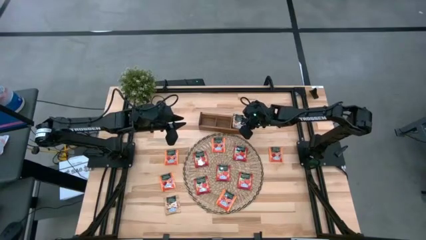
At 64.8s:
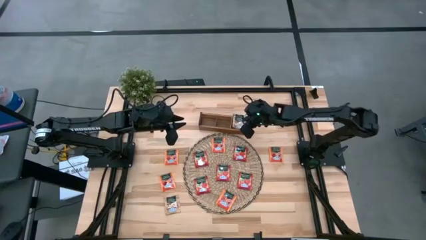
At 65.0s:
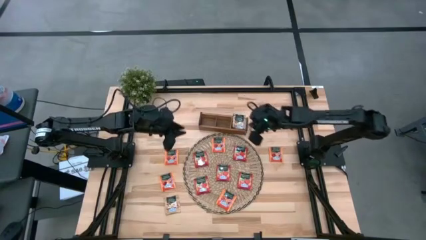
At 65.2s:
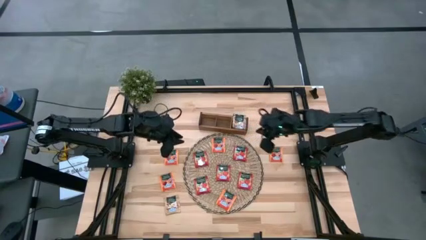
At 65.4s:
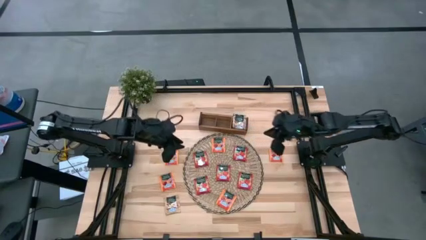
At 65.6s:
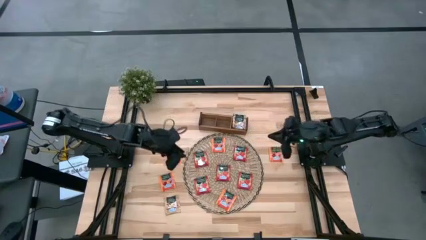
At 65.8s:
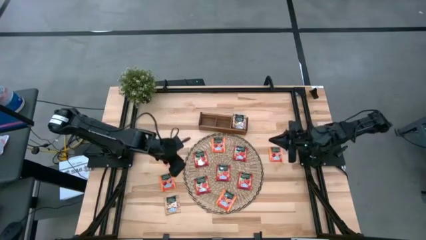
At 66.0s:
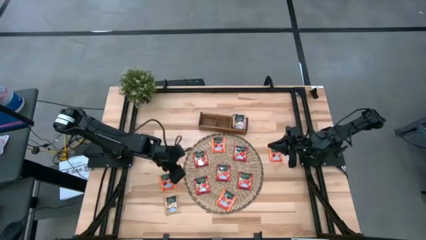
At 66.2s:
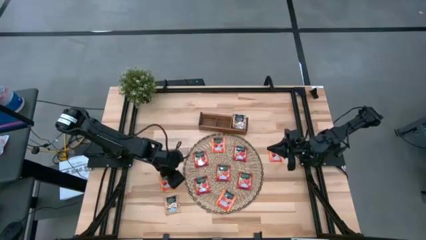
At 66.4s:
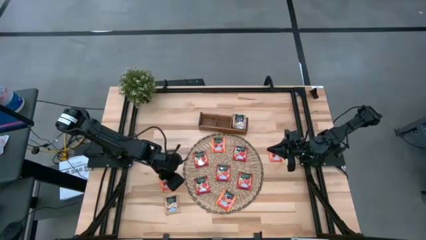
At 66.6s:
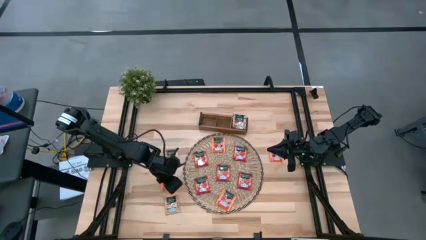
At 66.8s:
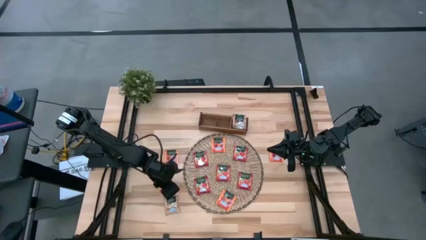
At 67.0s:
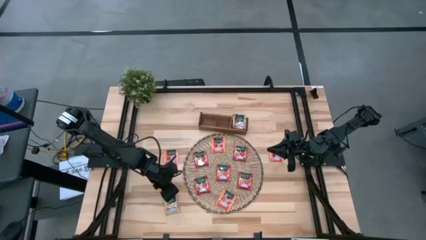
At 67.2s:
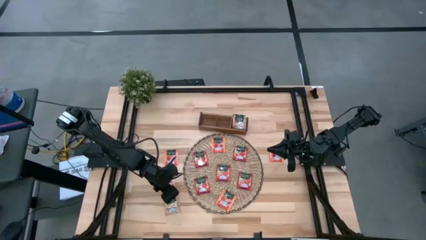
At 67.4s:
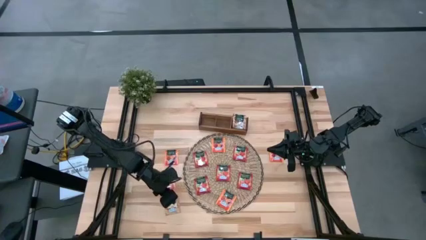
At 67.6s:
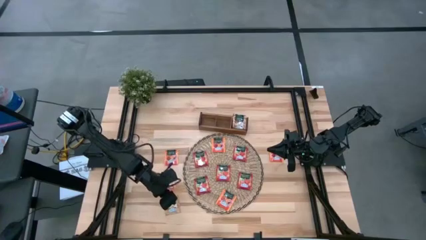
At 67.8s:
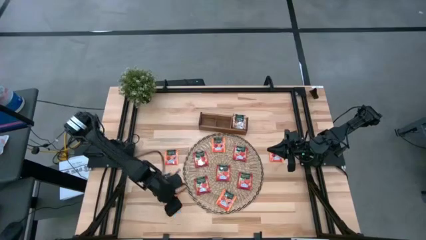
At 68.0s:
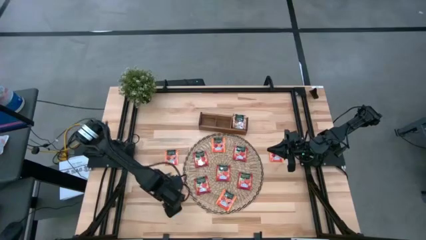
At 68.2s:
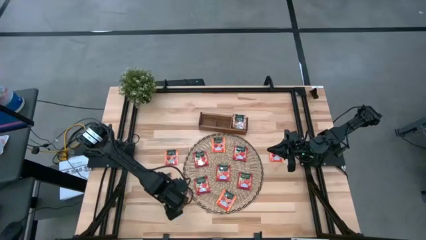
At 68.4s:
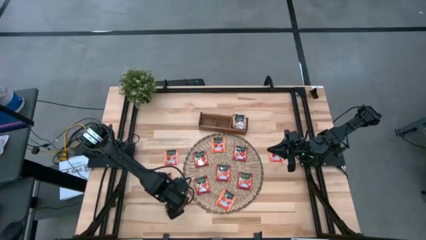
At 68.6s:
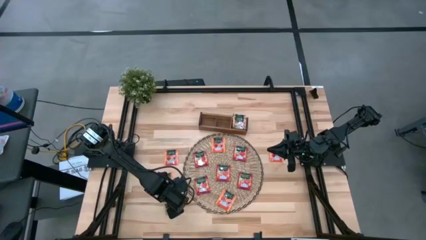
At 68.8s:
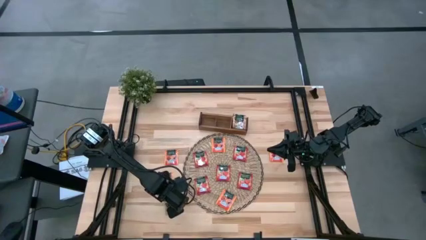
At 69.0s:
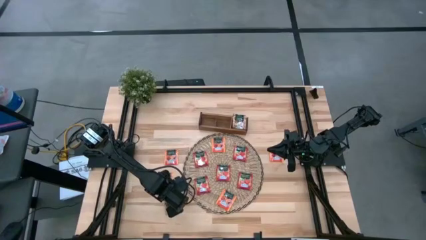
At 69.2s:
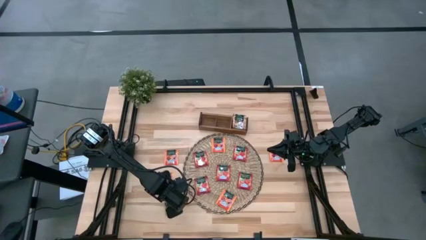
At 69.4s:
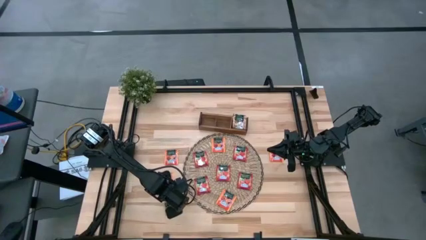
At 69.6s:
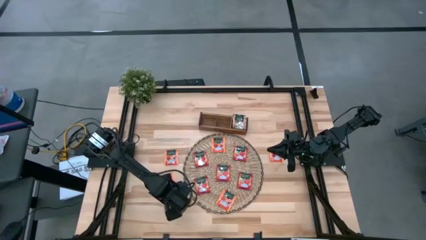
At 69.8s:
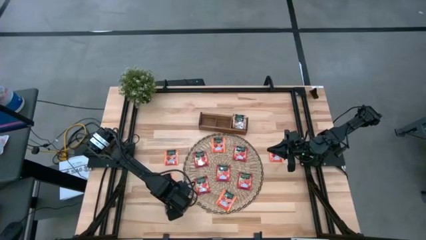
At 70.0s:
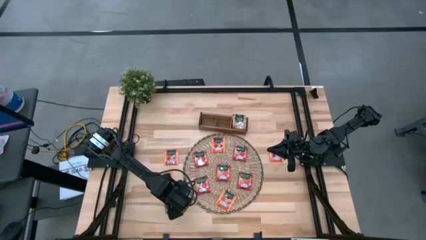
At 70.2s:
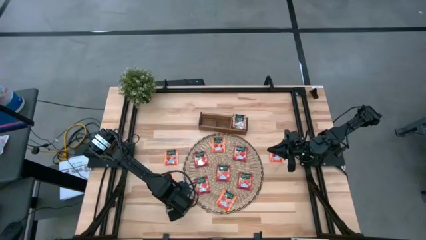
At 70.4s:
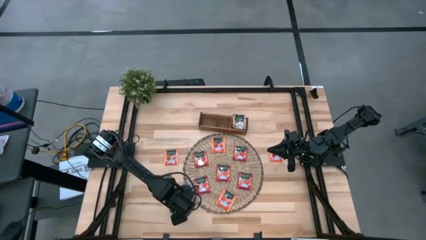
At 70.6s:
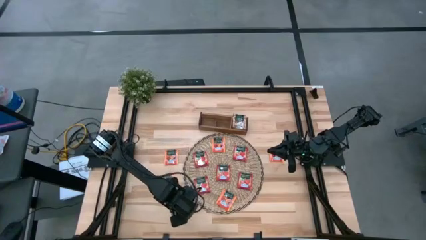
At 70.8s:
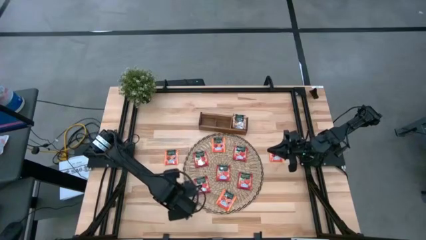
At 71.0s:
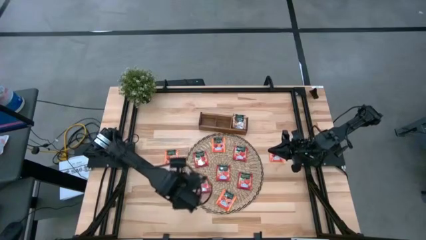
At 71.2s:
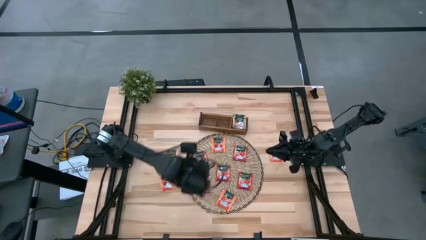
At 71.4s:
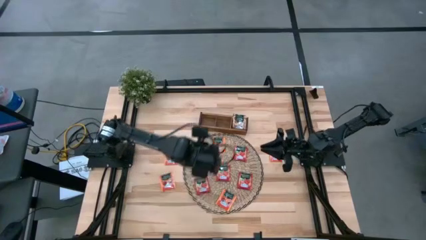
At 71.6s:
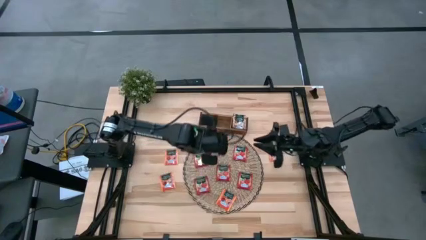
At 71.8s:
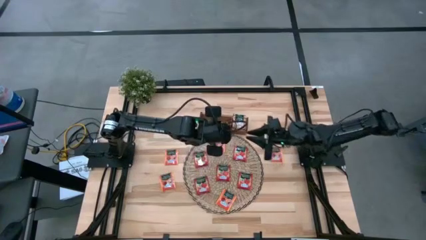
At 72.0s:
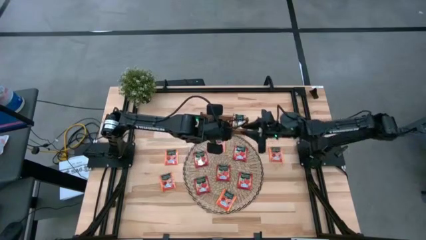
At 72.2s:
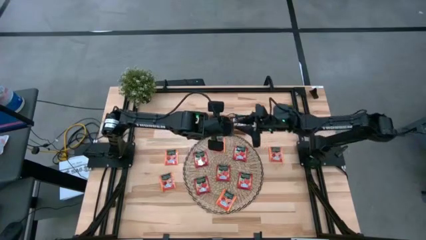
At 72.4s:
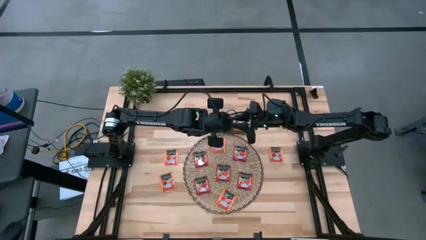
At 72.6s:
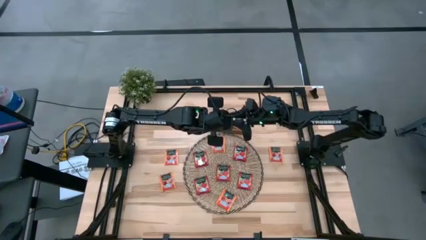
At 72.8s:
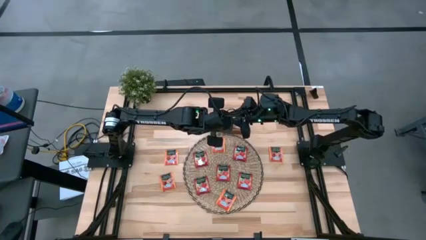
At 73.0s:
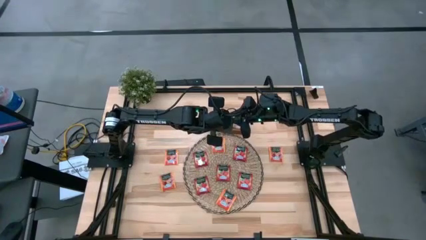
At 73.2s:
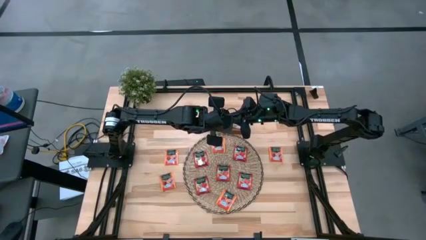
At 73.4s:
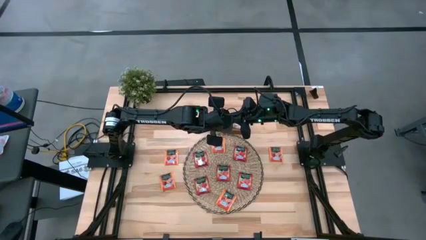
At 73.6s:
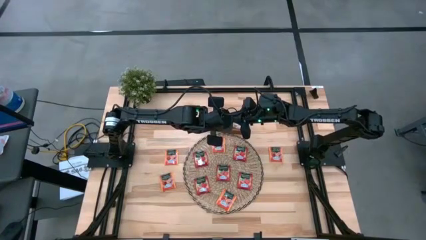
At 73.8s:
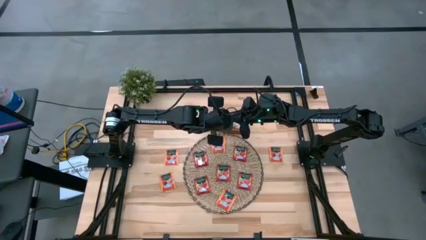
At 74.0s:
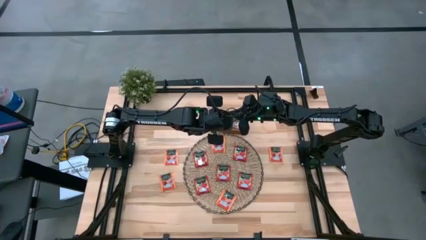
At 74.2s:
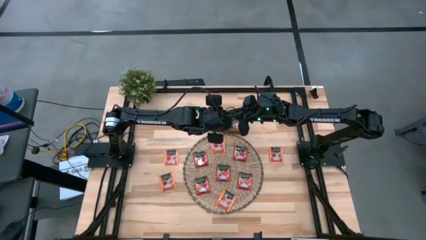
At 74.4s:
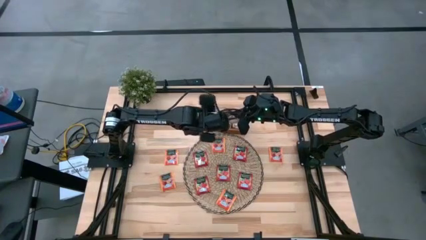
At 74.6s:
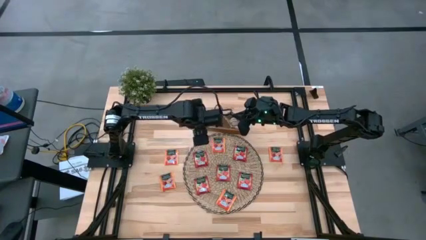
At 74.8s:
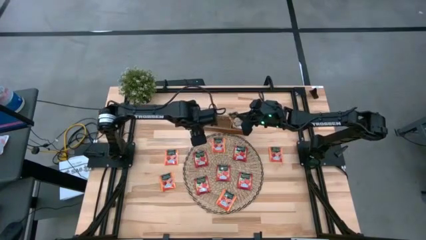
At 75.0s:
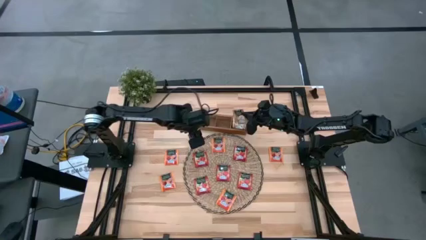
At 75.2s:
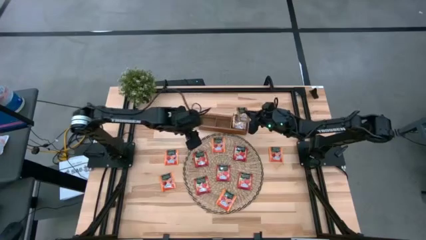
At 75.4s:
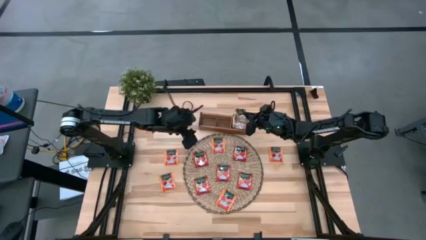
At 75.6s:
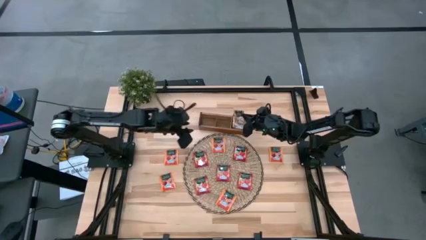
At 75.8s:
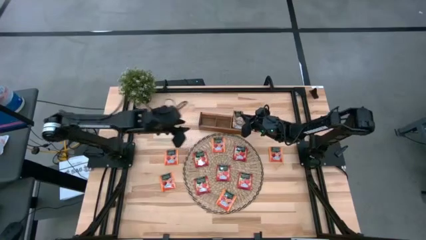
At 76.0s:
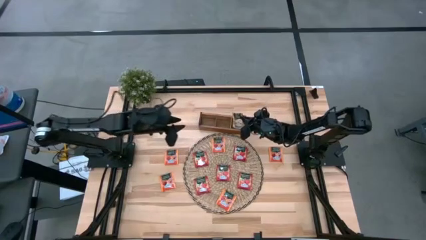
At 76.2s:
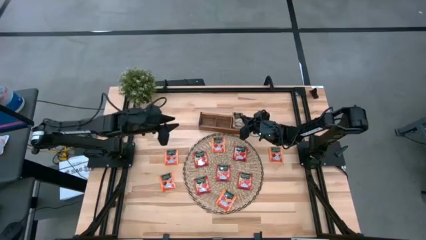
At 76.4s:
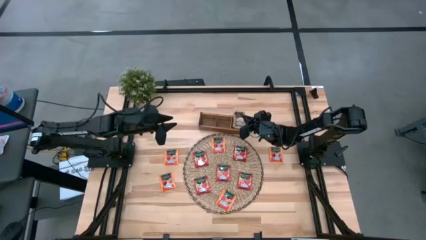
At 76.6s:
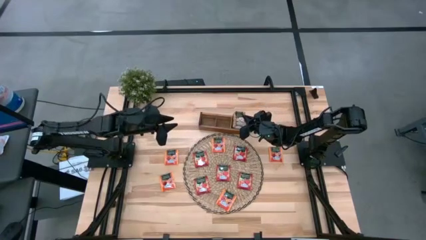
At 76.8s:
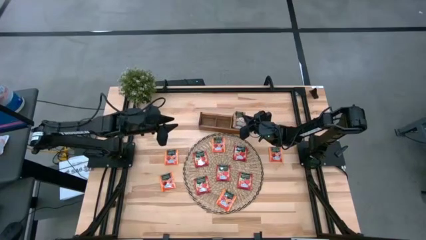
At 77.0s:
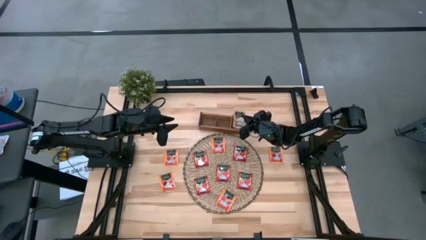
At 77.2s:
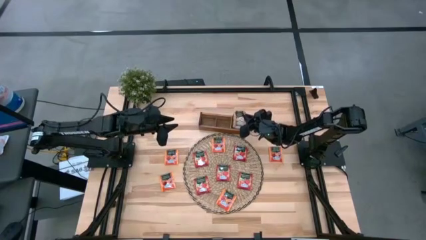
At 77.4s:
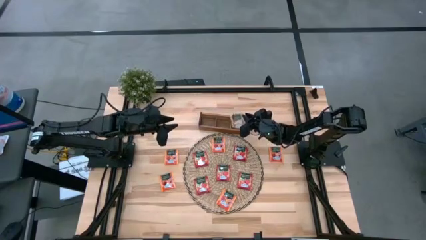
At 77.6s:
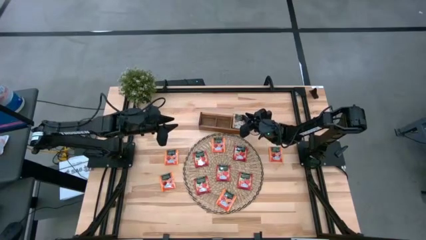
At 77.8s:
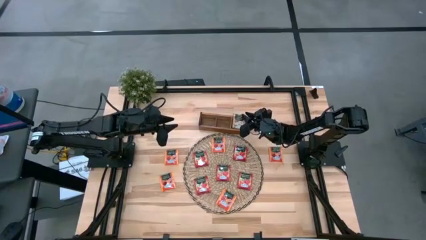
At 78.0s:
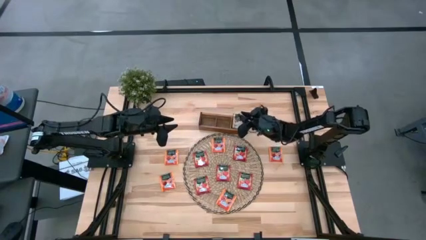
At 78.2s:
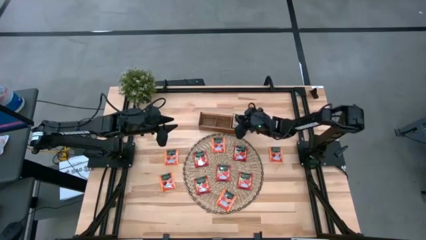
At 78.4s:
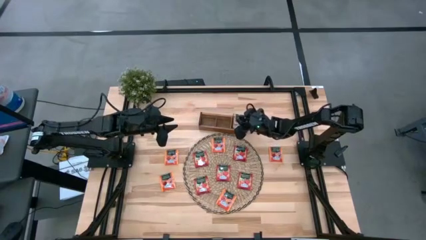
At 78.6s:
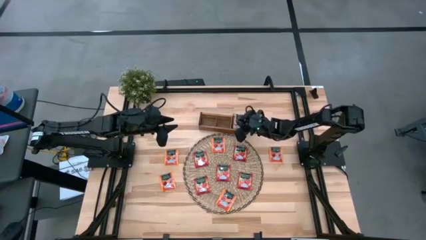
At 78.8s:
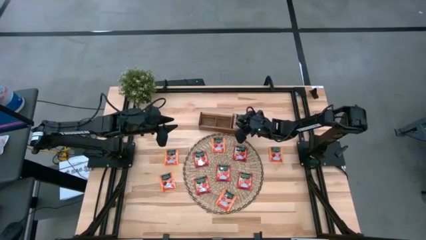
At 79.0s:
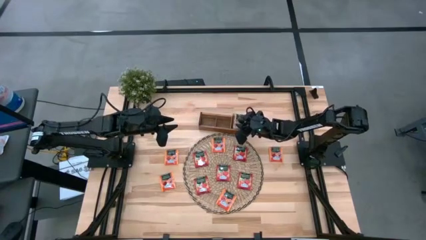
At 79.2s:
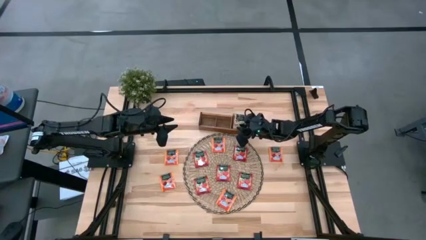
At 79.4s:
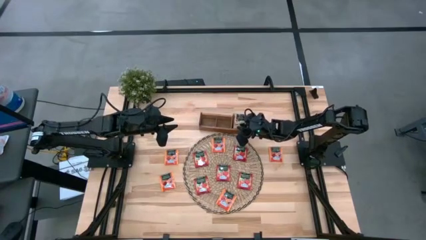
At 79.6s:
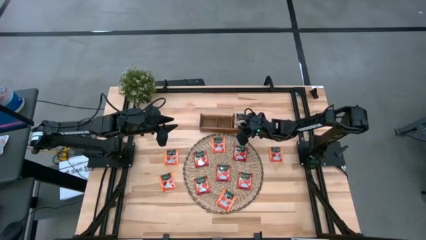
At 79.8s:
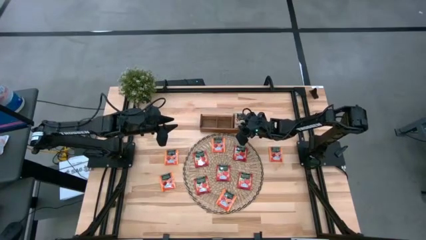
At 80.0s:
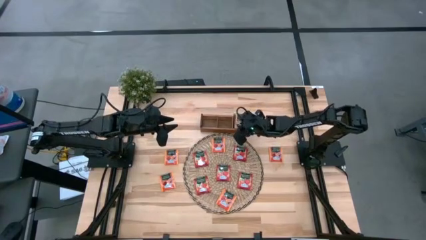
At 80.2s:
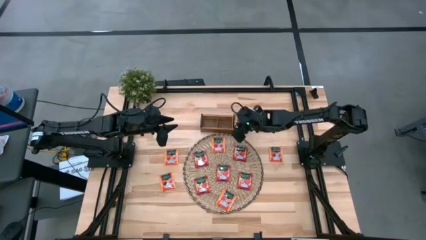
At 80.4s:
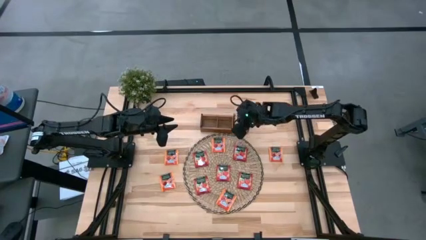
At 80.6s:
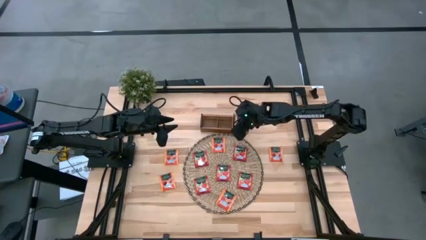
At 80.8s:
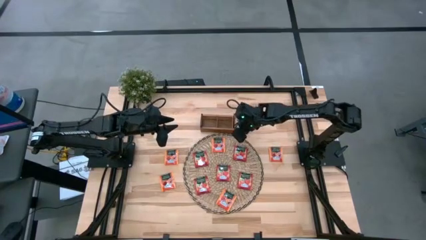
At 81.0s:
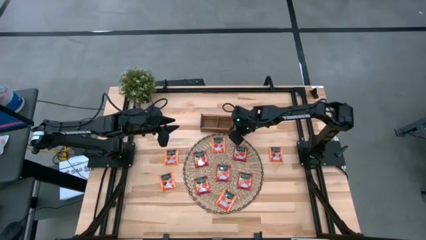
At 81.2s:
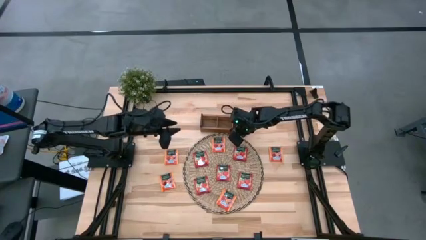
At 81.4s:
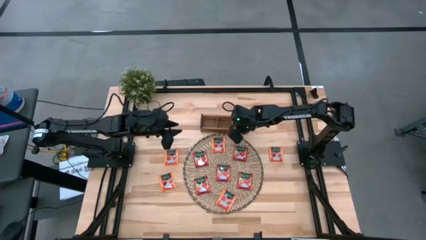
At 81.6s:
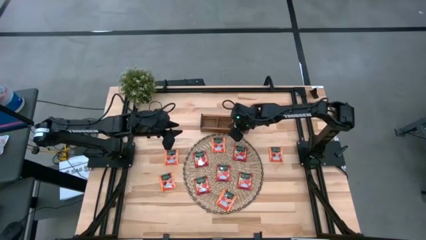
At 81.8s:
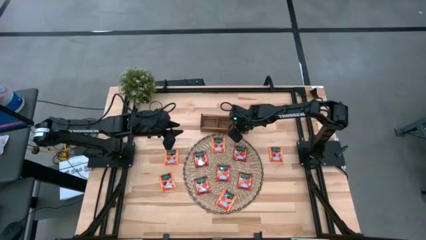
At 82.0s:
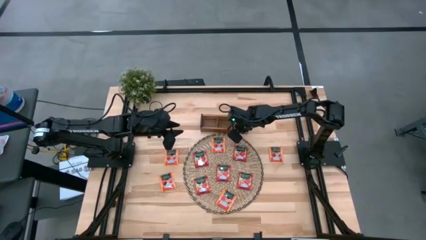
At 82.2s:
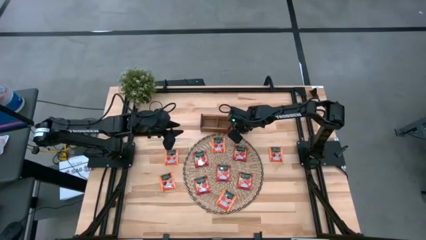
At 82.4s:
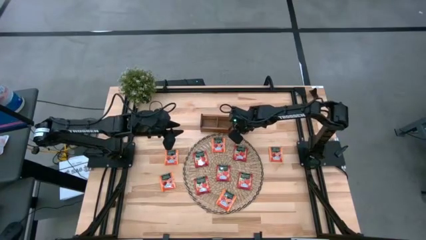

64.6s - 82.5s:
Task: Pick & Place Tea
Put the brown tea bag into the right section of the wooden organizer
